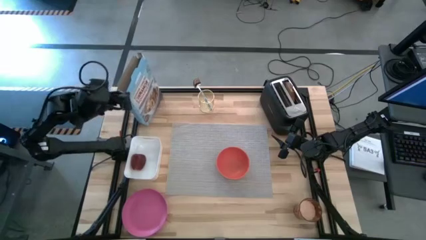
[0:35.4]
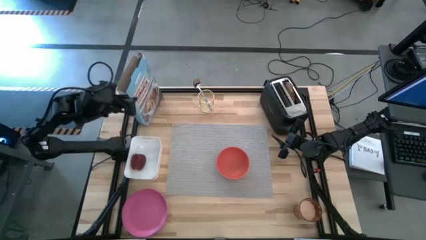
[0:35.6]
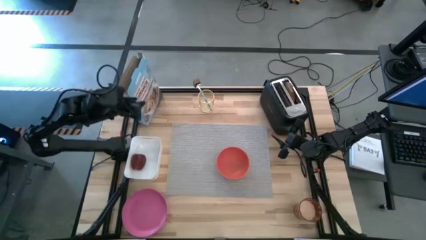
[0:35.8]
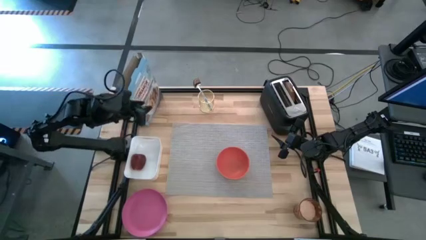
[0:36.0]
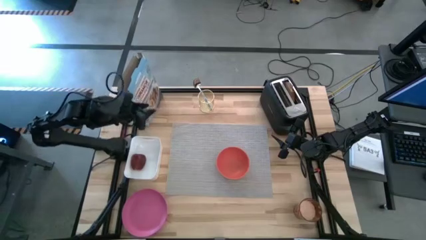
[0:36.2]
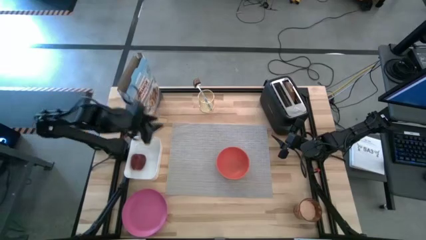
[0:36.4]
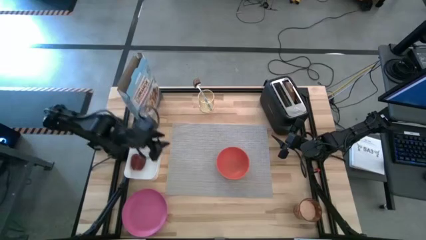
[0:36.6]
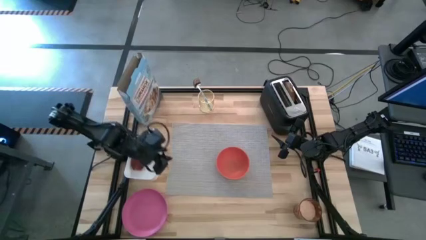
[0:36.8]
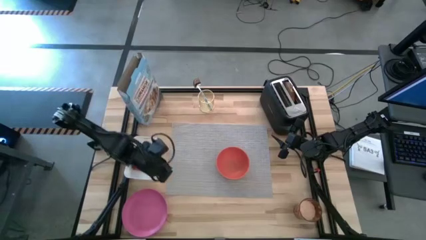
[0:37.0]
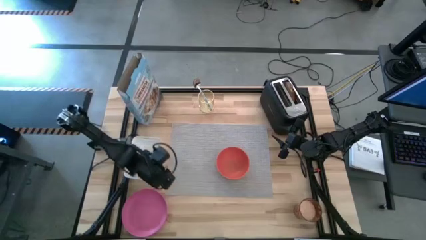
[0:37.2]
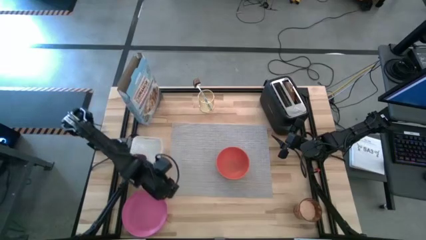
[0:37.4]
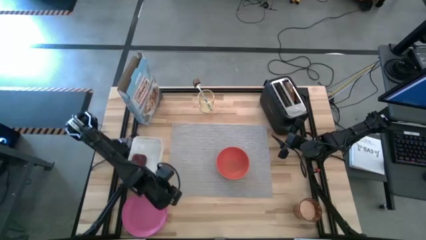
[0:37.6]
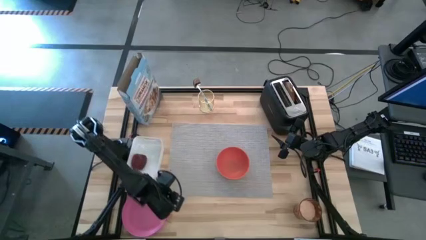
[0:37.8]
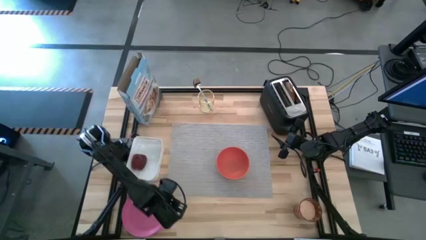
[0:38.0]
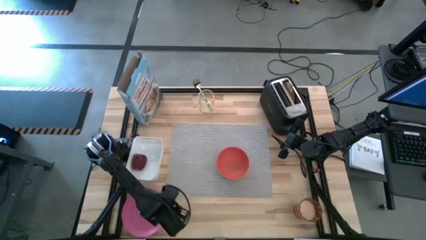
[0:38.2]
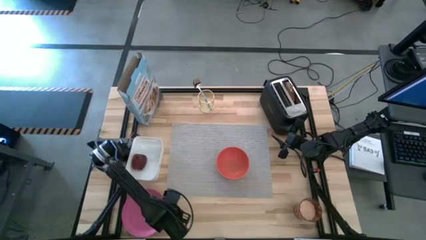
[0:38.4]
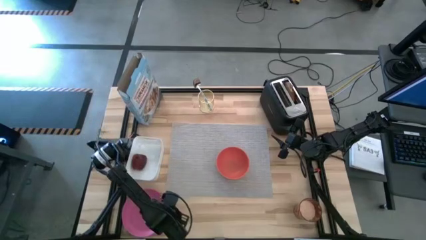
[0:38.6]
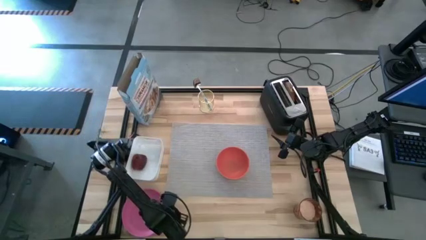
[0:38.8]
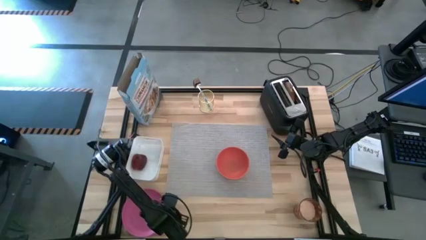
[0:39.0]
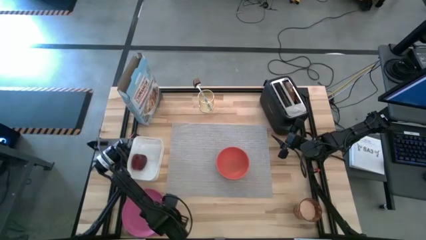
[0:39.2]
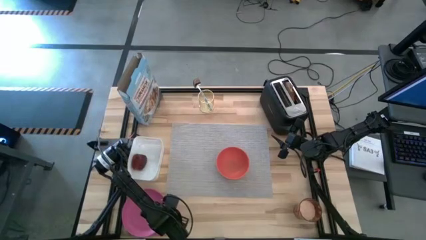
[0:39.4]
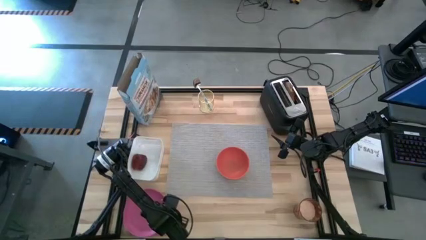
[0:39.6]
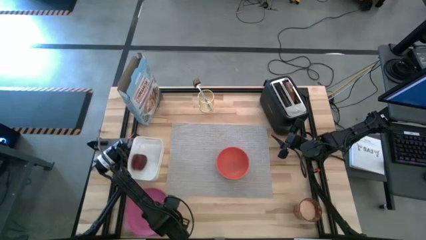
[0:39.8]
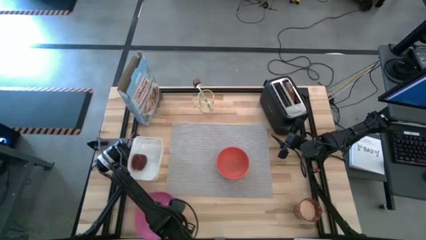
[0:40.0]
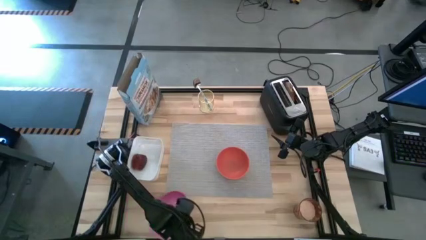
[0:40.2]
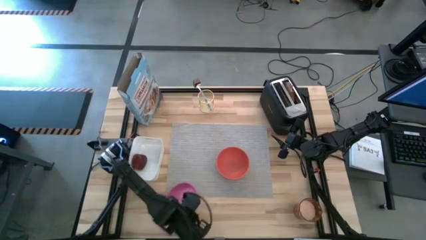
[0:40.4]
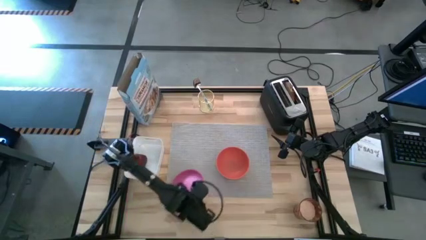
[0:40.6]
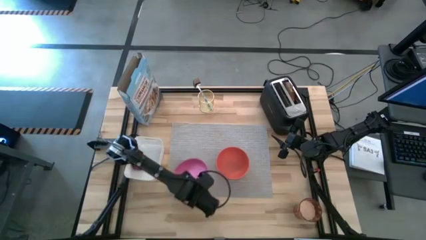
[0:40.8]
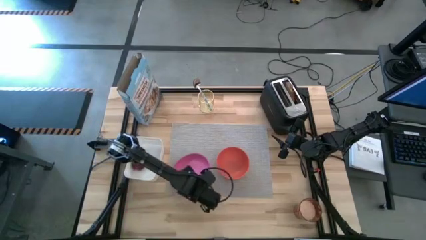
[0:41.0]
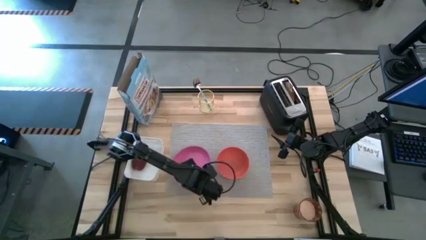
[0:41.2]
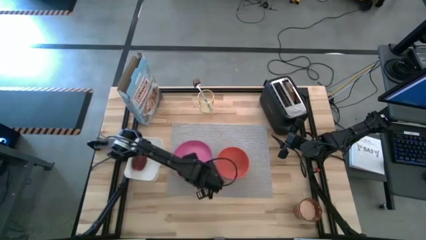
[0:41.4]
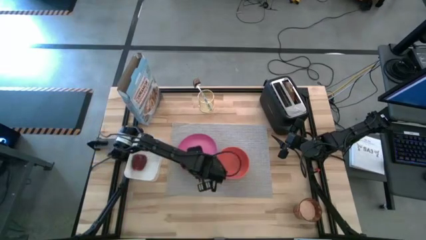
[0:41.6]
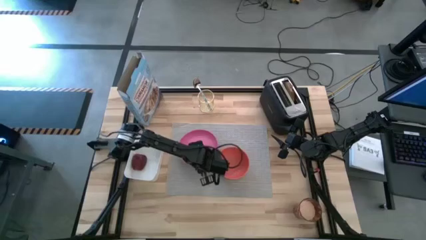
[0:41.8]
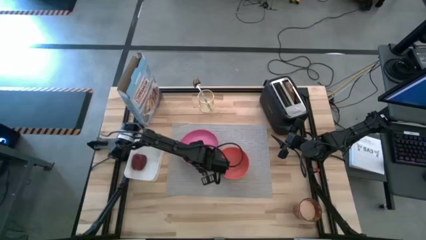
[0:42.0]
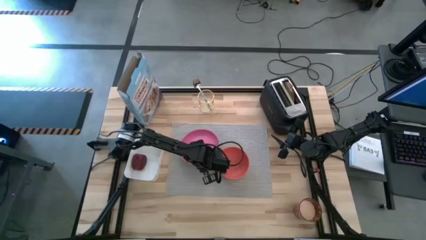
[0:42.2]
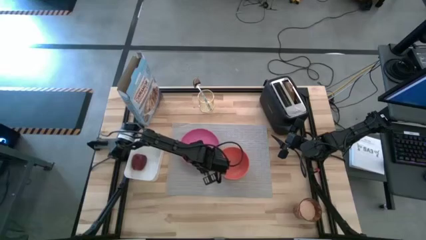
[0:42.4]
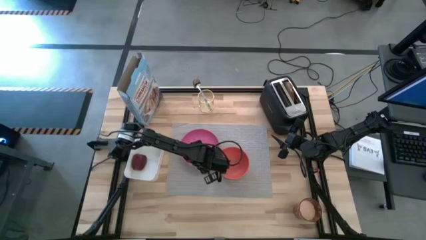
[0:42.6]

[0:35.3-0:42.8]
Task: Arrange a breakfast setting
Put the pink plate on the gray table mat

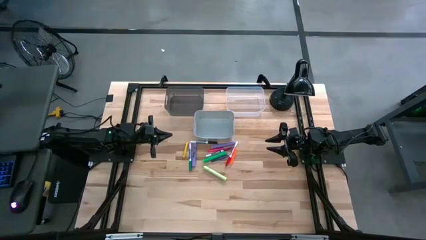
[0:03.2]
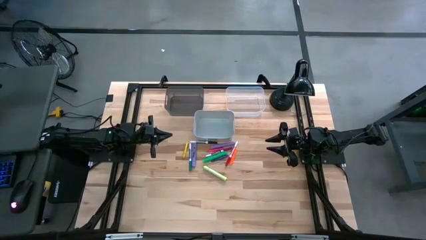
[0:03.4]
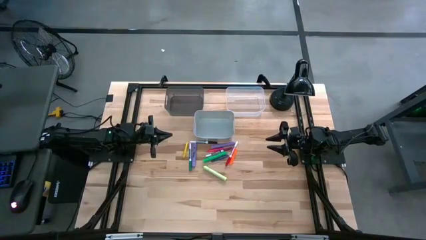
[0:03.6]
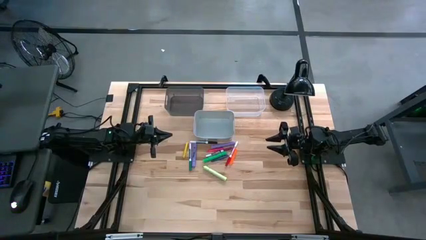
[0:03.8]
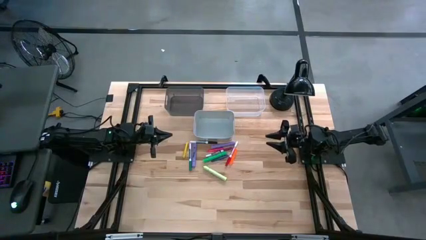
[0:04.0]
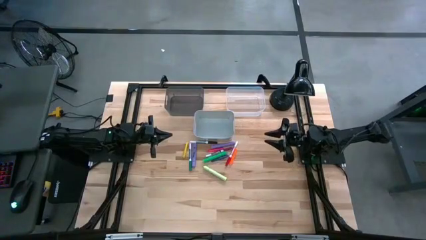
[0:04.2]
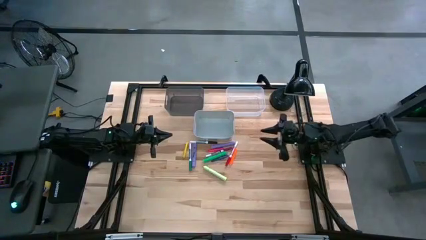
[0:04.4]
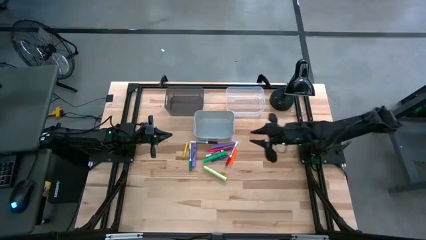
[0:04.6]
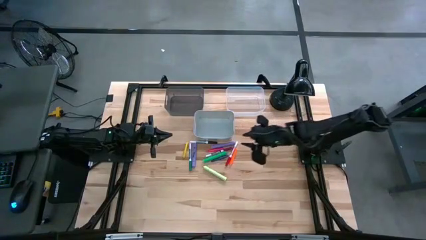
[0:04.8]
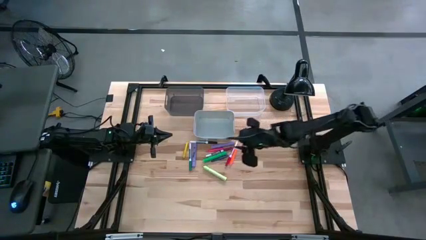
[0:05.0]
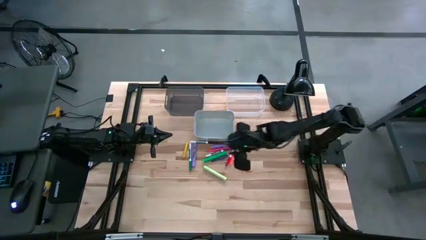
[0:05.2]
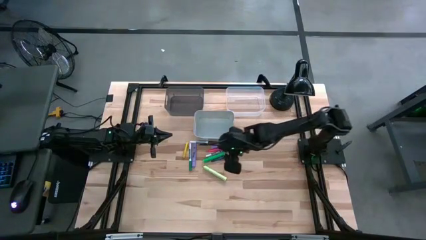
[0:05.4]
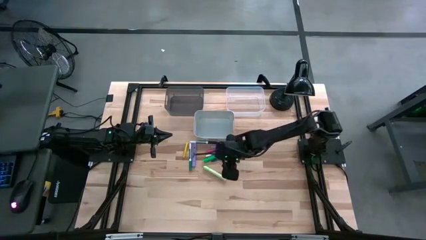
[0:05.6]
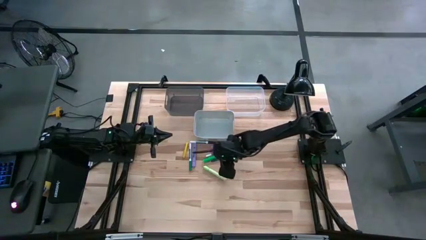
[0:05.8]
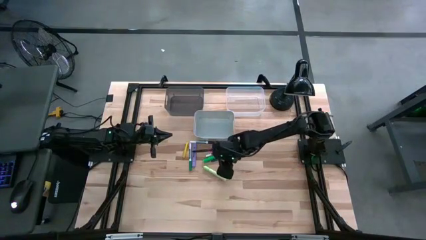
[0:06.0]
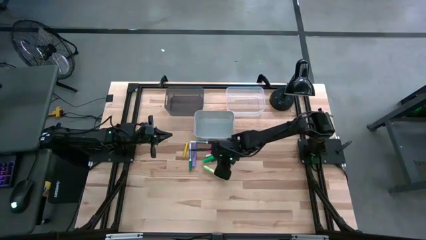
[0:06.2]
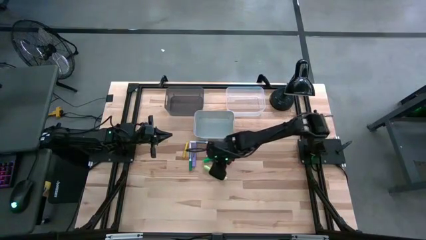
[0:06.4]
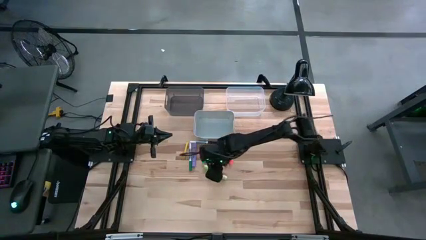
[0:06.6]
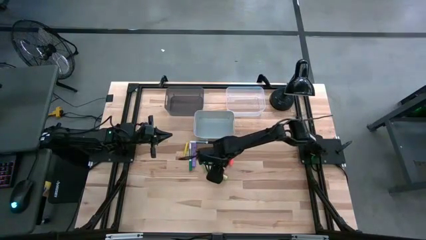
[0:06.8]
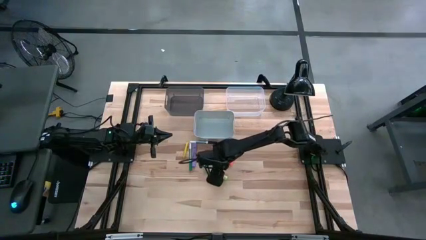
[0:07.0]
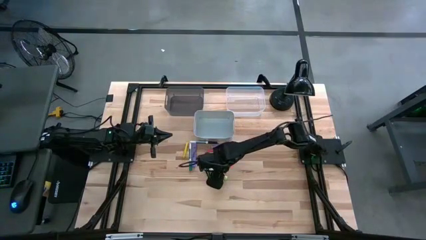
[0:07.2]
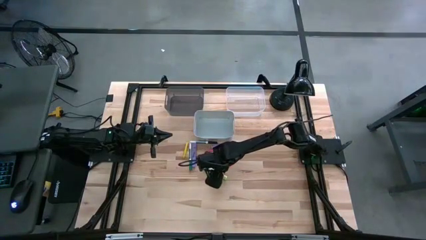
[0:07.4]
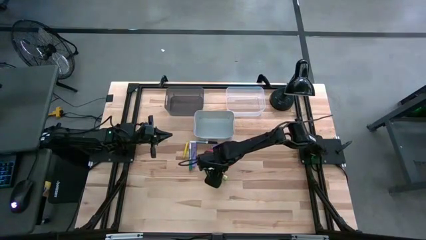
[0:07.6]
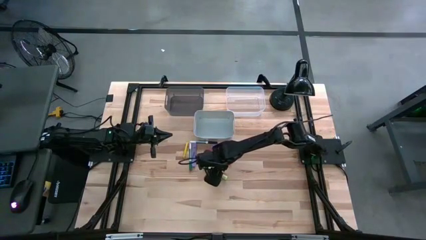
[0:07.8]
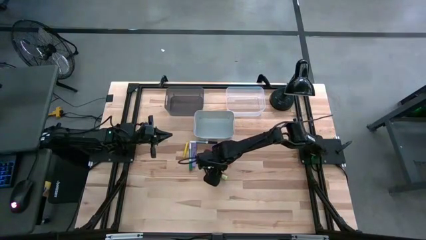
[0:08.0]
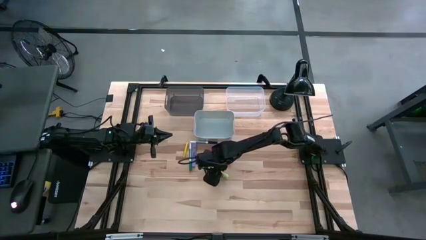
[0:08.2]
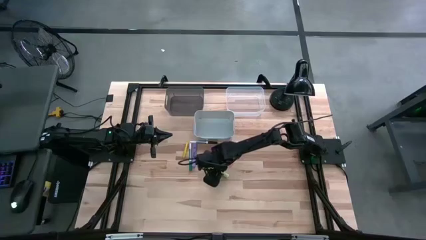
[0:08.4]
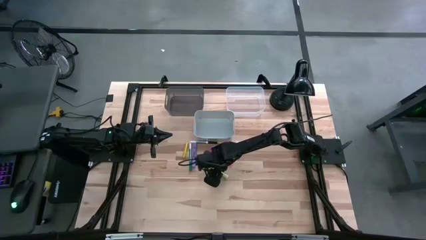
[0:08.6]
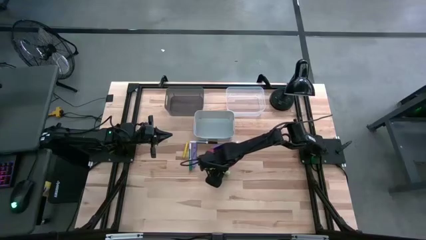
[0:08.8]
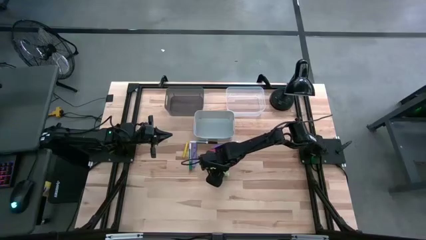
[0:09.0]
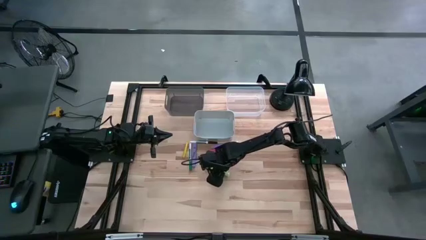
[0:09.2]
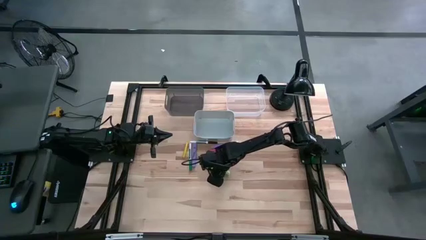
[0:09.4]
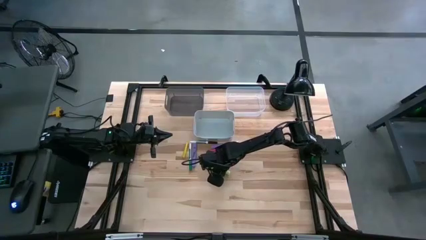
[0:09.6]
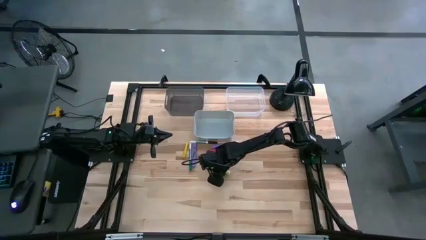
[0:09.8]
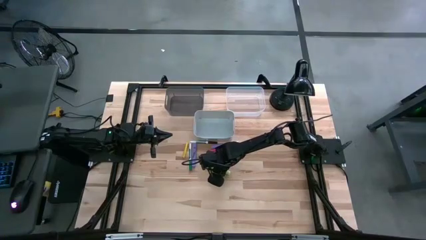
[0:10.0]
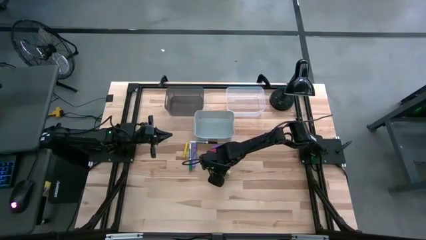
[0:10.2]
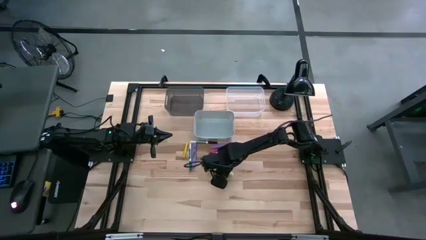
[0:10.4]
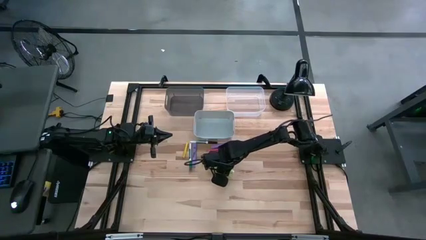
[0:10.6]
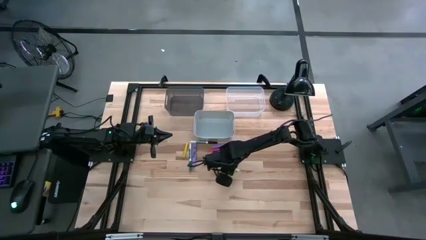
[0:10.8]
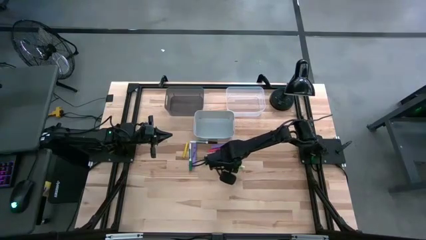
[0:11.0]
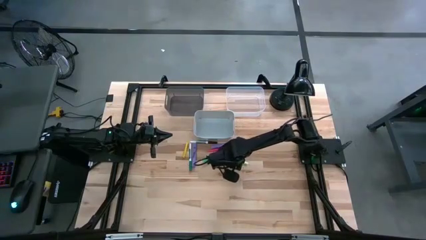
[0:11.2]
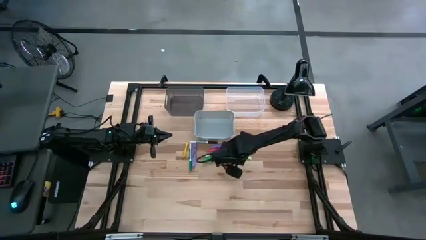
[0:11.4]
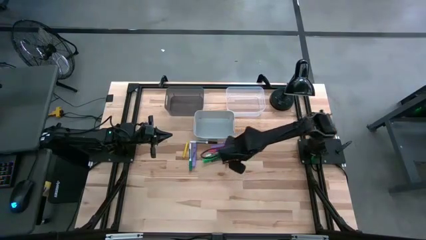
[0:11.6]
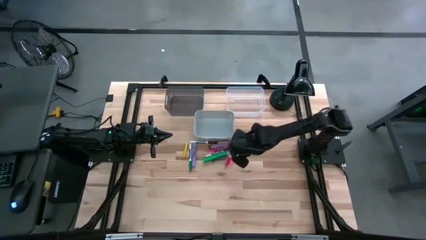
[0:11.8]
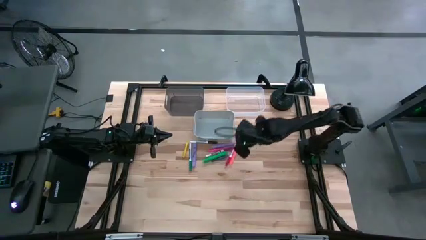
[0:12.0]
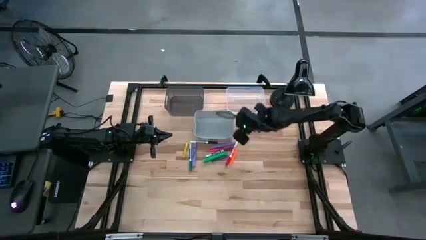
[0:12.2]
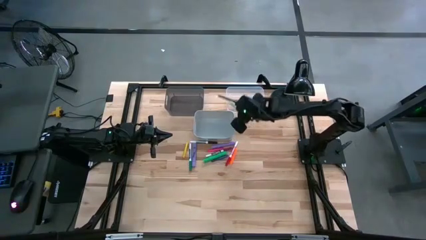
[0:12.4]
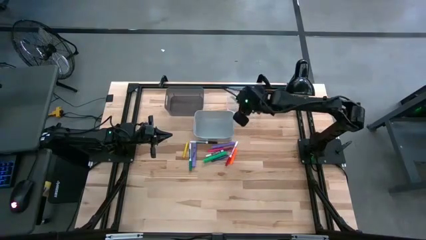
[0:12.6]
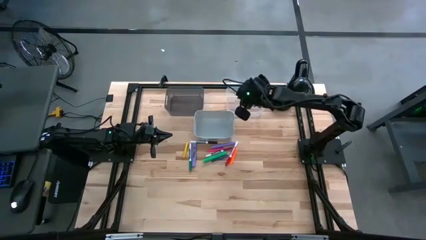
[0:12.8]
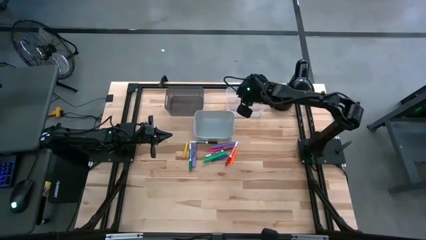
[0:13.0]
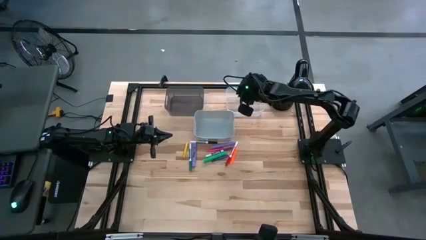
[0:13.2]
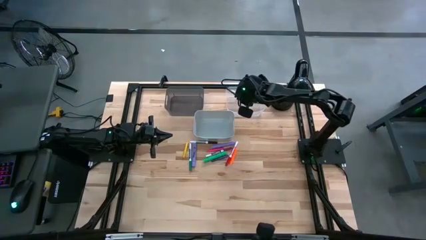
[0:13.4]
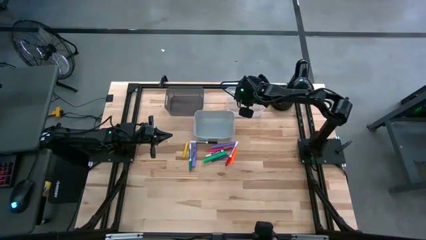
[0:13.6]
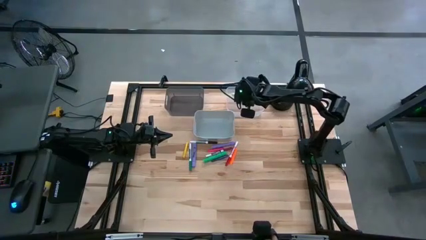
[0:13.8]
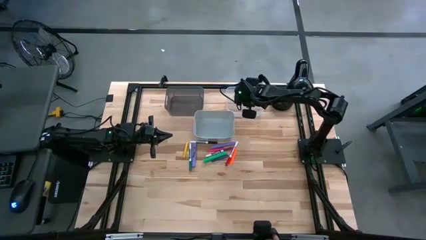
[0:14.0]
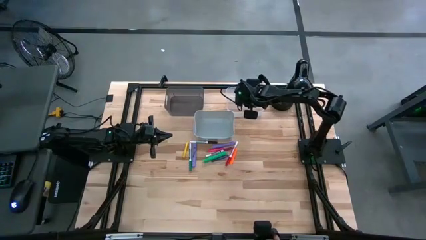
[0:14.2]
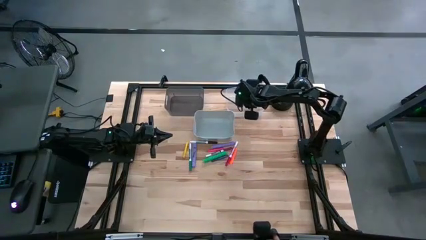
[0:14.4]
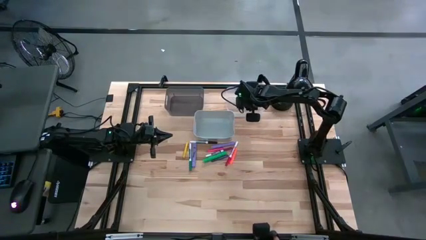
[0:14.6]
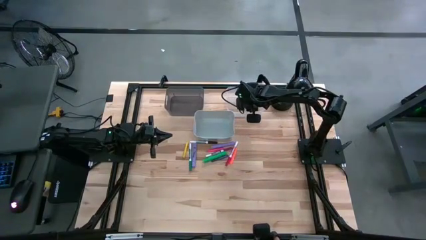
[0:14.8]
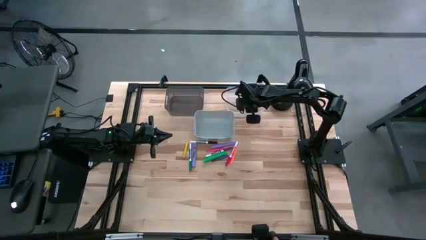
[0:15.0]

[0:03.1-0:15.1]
Task: Pick & Place Markers
Put the light green highlighter into the transparent bin
